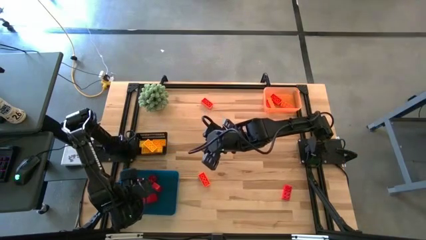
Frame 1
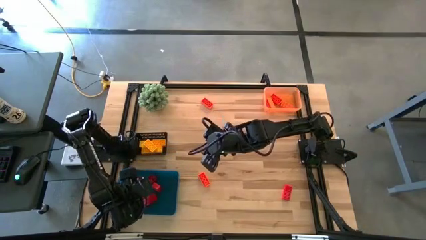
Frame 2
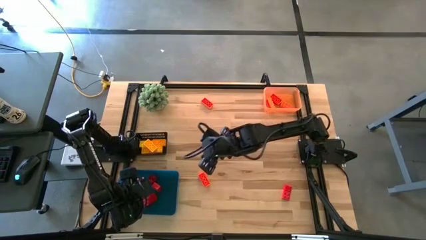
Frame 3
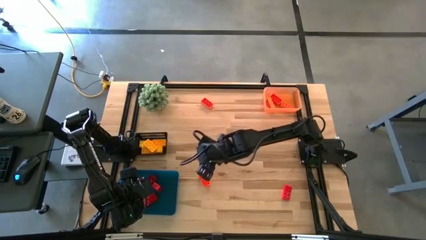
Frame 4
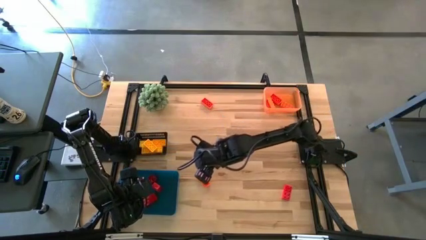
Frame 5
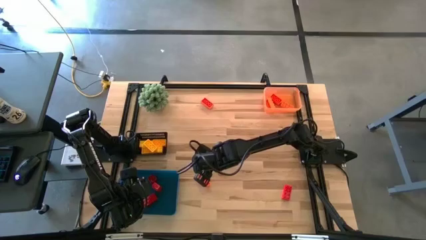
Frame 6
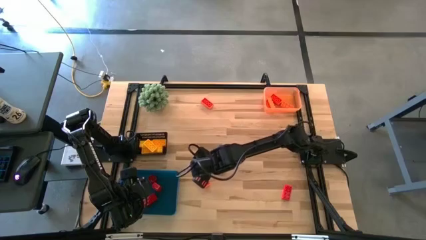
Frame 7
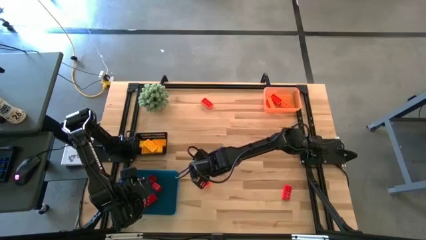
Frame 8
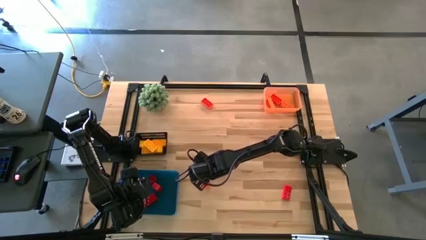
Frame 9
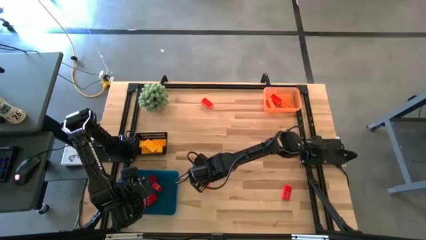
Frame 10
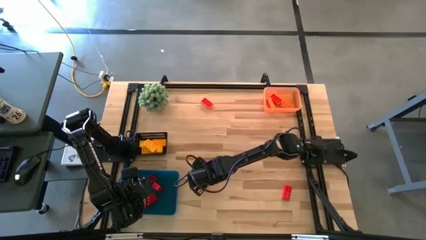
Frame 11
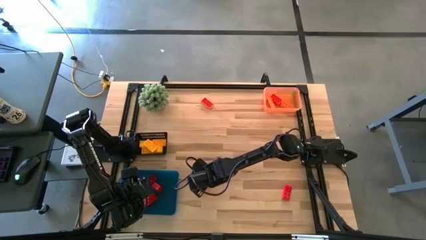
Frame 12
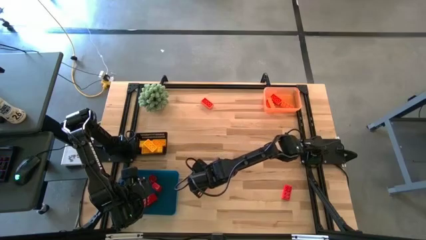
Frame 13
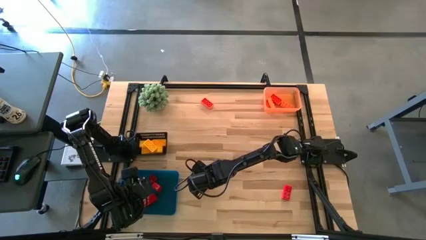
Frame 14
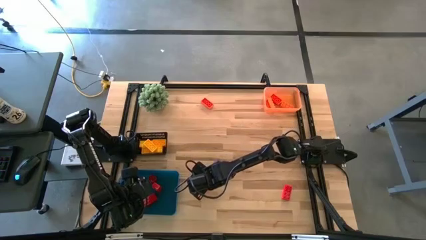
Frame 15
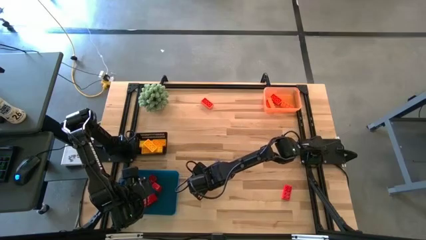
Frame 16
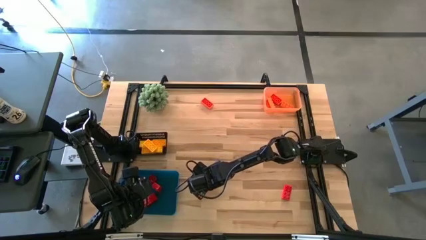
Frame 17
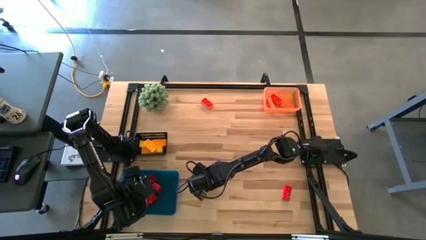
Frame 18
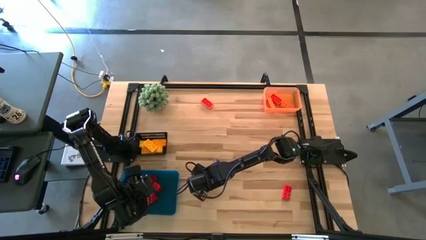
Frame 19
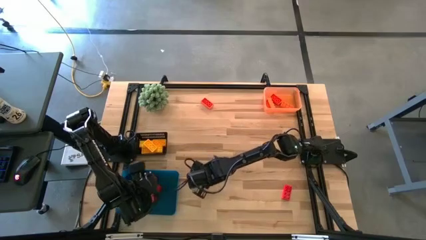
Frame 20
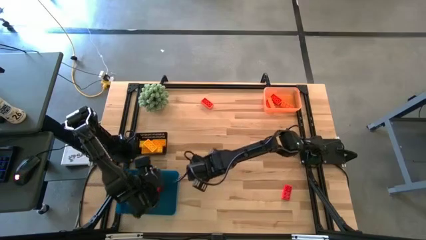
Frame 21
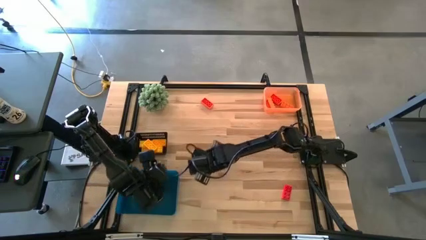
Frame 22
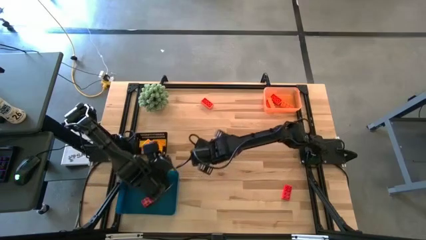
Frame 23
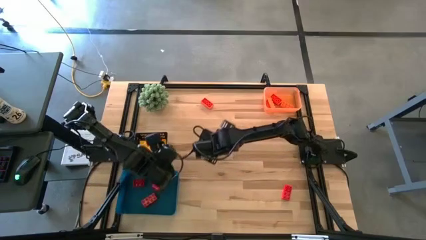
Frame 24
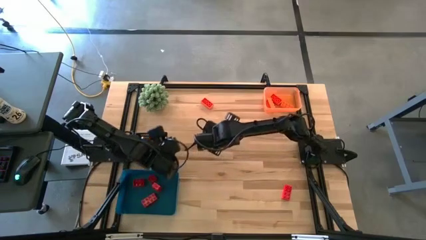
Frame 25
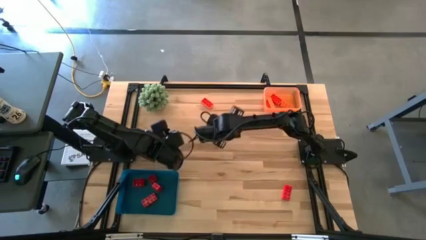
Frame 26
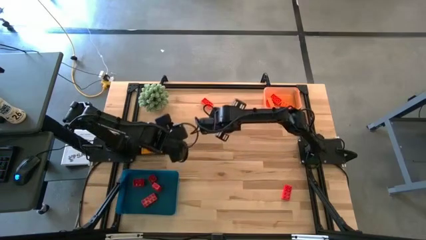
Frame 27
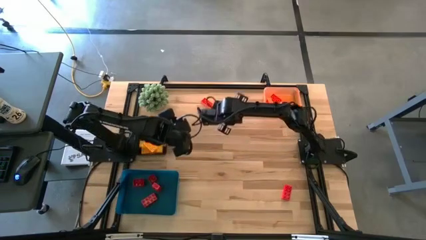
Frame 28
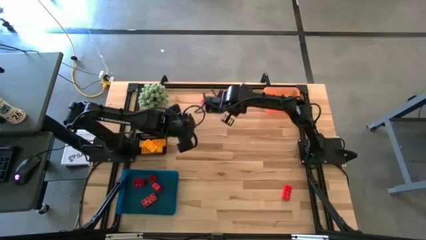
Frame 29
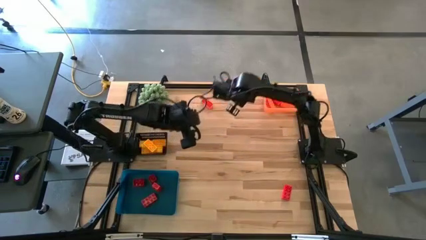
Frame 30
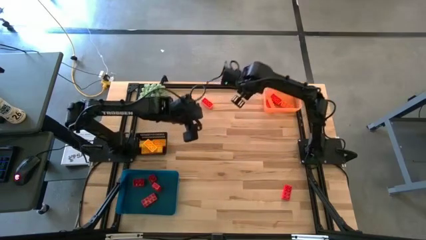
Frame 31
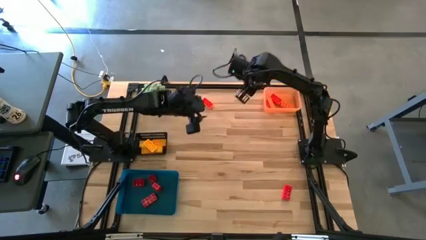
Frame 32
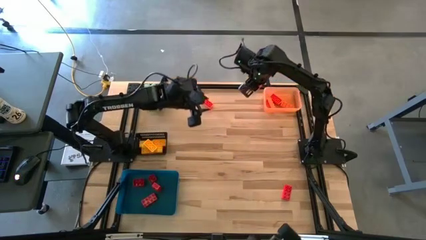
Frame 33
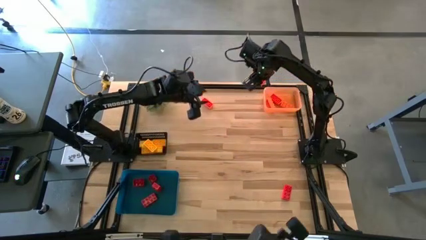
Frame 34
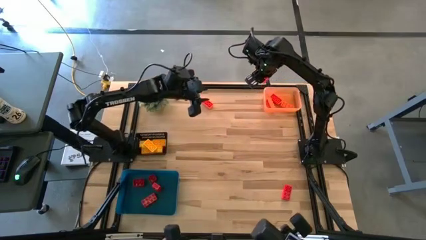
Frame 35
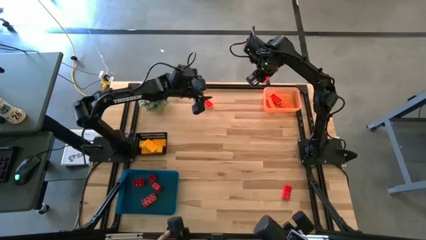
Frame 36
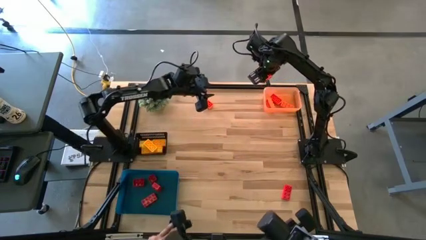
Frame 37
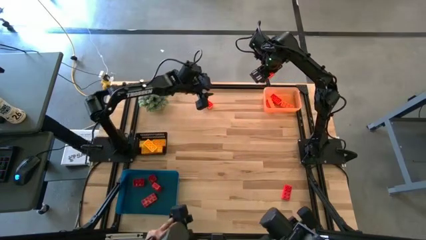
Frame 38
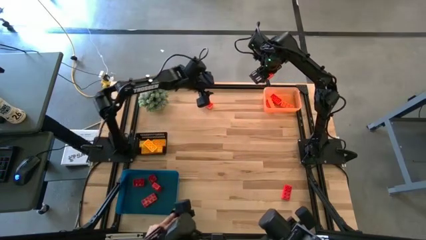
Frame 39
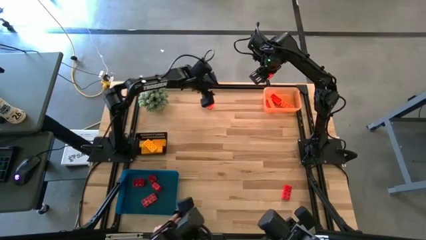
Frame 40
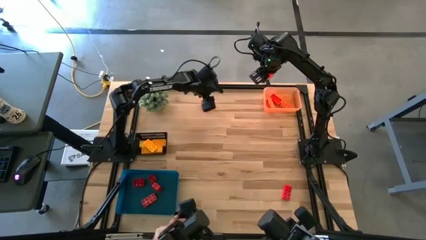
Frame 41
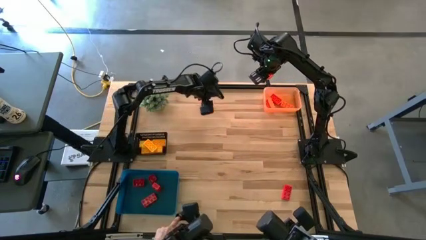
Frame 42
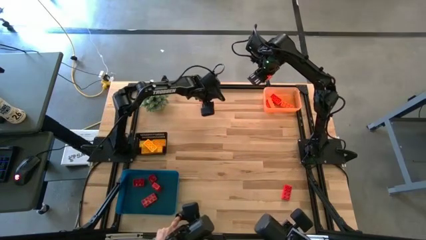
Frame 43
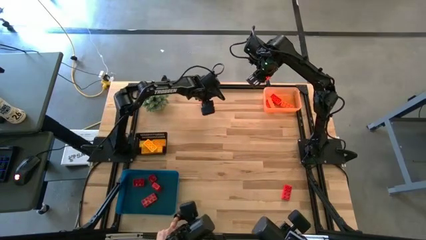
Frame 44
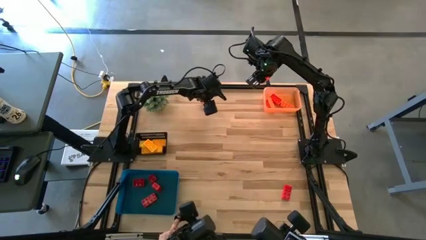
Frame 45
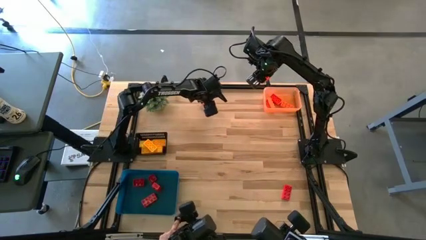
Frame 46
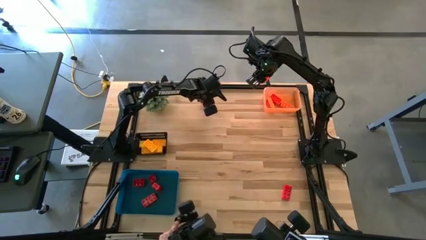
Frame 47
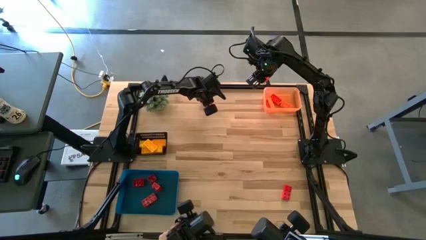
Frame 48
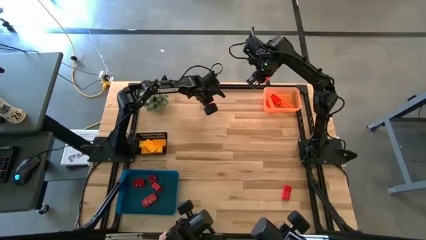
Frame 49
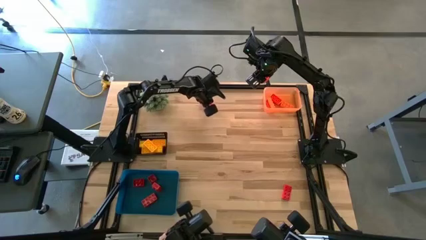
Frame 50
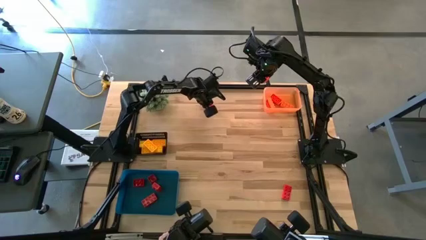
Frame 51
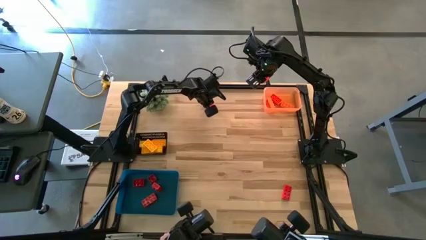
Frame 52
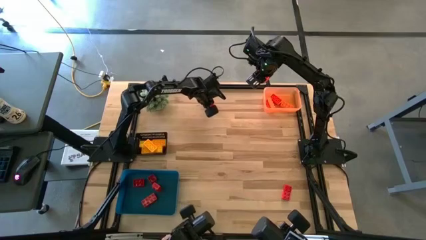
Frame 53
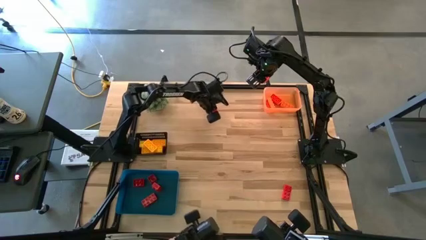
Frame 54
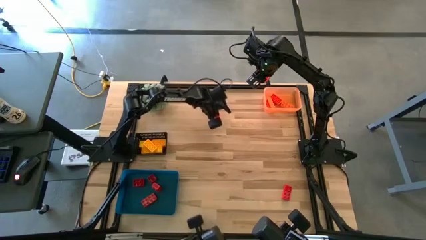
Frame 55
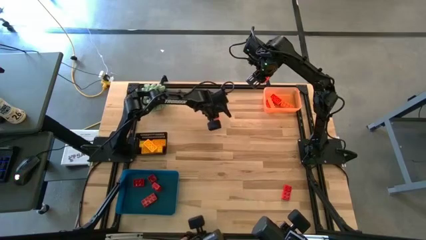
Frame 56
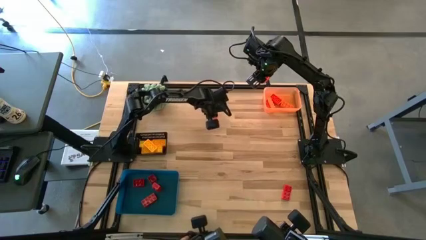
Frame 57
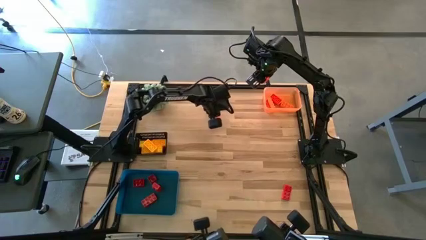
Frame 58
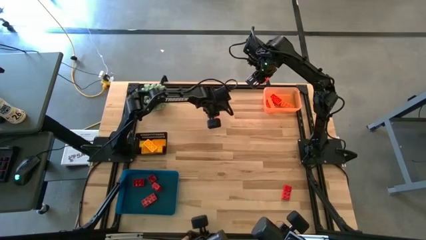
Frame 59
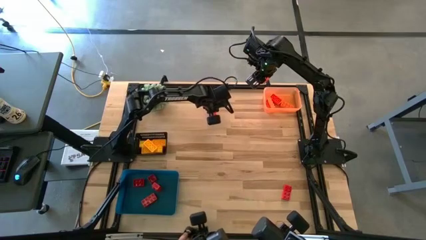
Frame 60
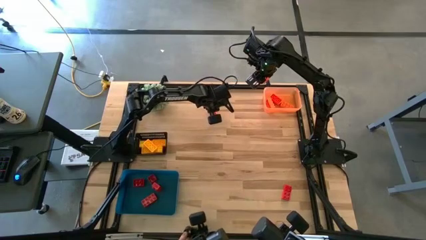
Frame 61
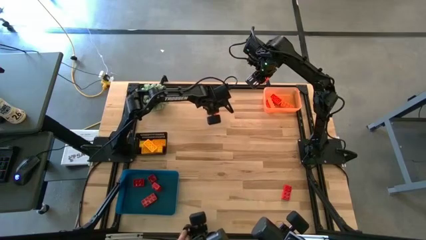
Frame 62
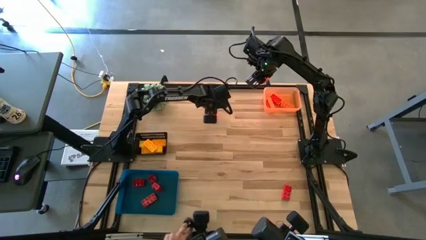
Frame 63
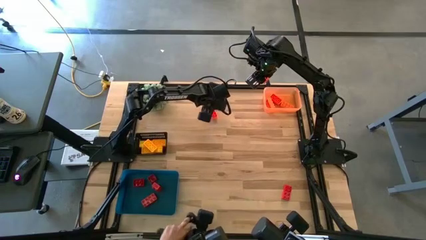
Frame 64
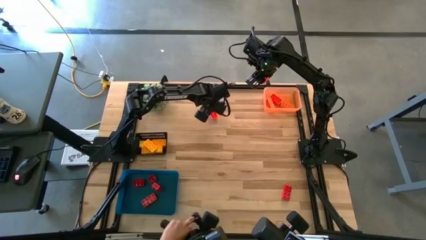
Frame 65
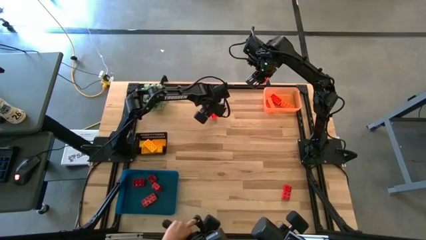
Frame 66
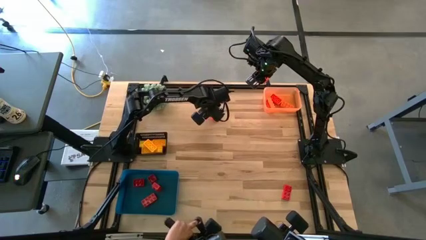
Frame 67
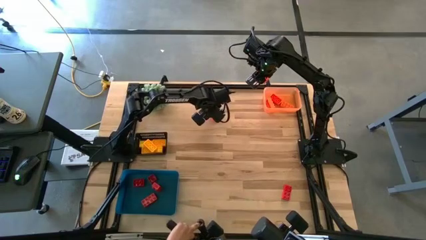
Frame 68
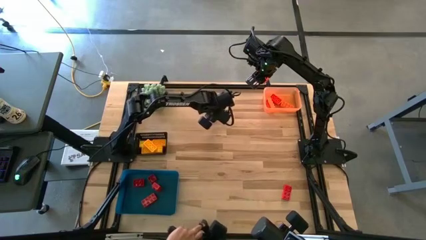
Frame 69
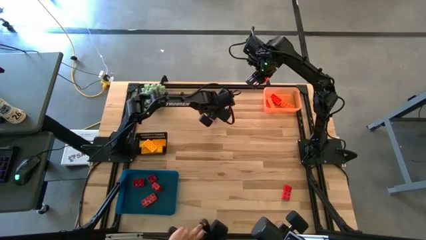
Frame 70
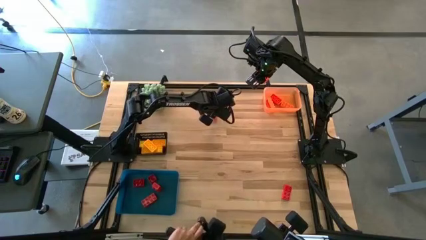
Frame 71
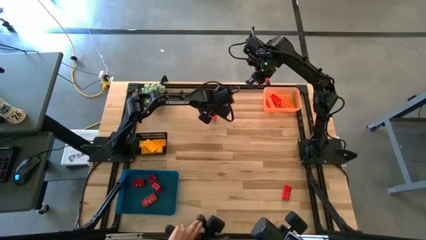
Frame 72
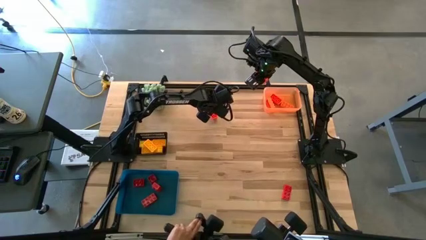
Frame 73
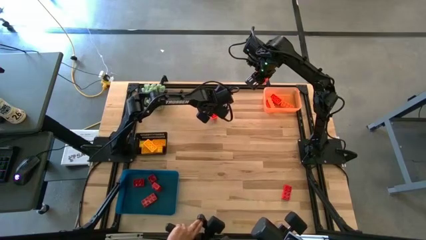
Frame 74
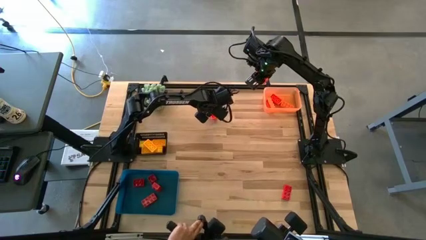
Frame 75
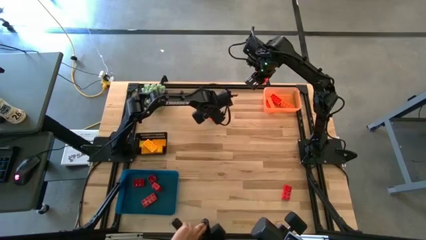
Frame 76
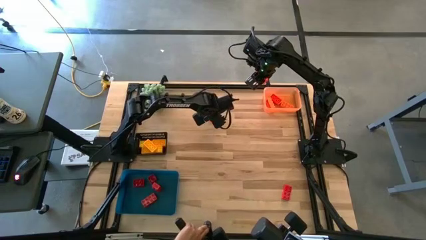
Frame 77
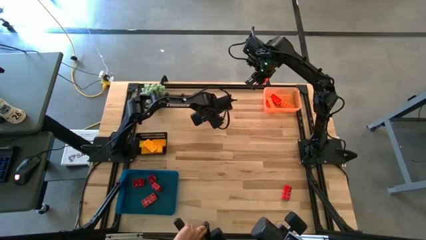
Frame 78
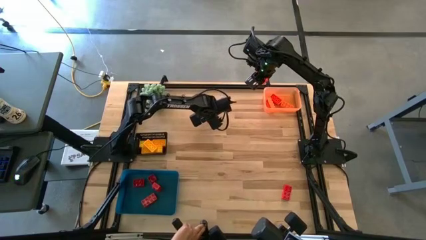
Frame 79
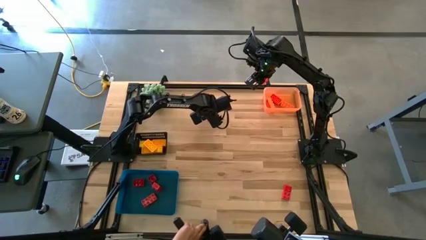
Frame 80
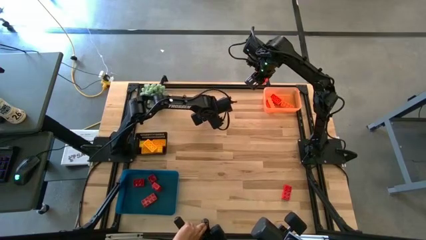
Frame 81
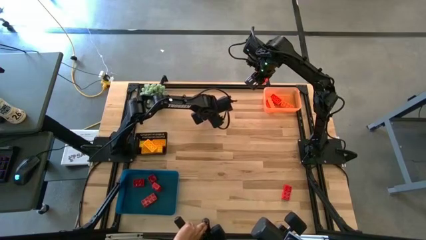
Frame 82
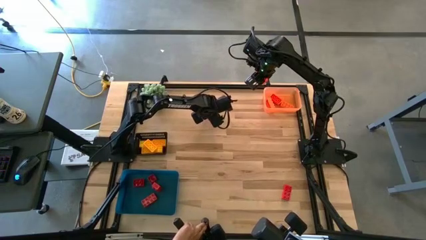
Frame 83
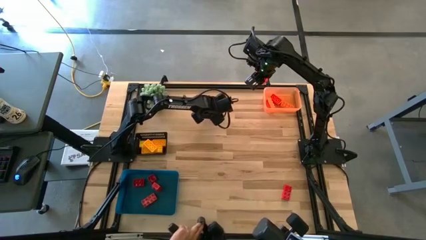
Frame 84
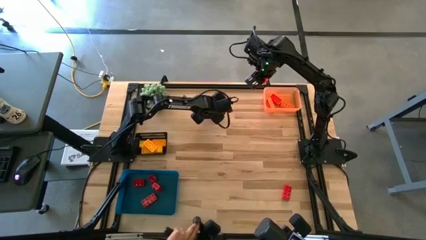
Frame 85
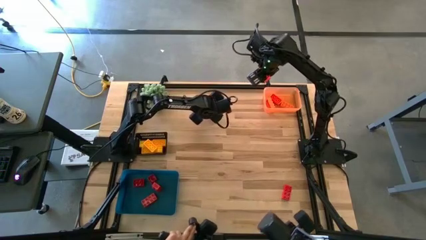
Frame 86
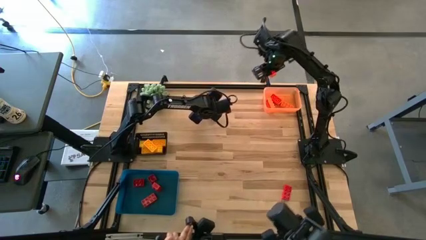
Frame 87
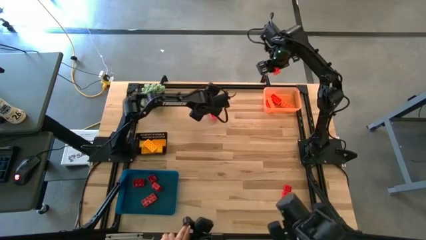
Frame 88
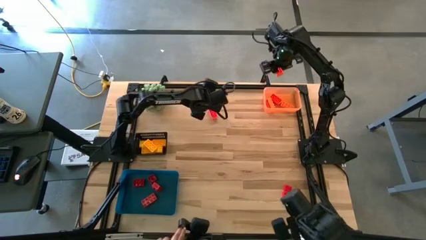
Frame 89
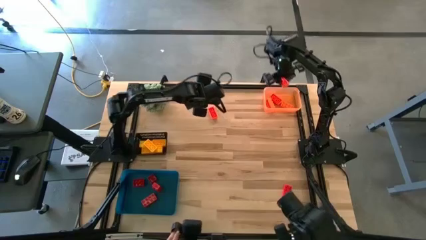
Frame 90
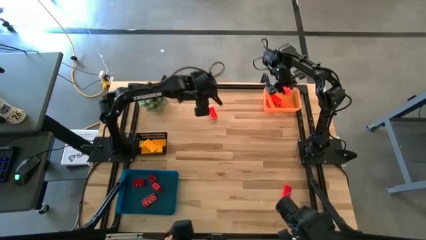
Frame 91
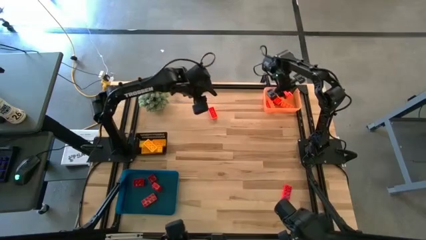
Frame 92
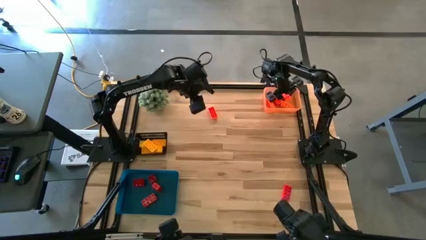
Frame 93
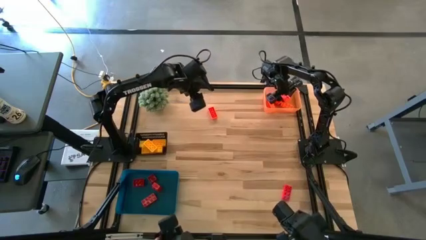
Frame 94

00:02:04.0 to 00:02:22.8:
Task: Sort & place blocks by color
Put the orange game piece into the orange bin
